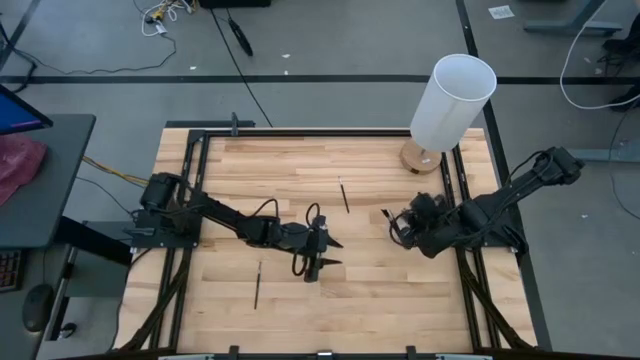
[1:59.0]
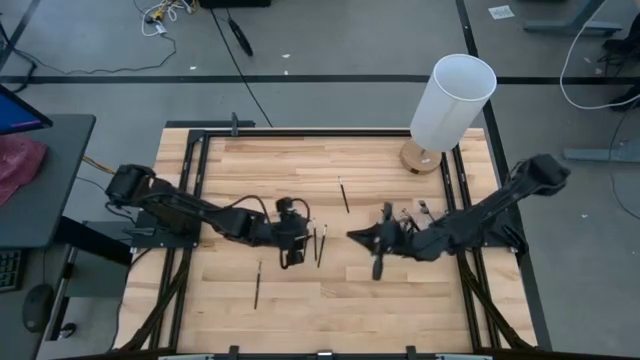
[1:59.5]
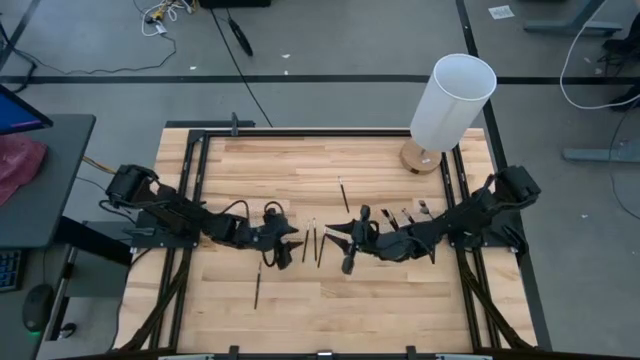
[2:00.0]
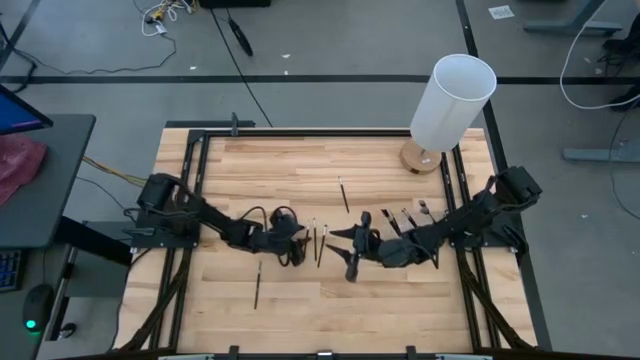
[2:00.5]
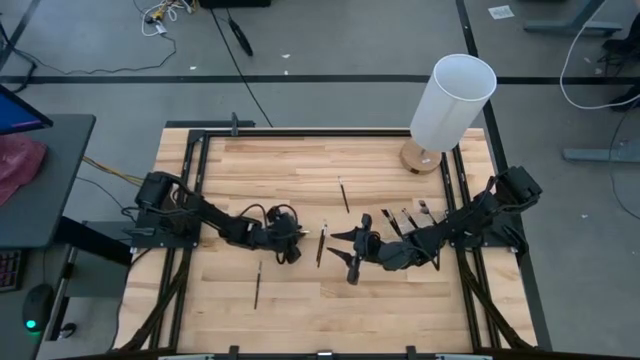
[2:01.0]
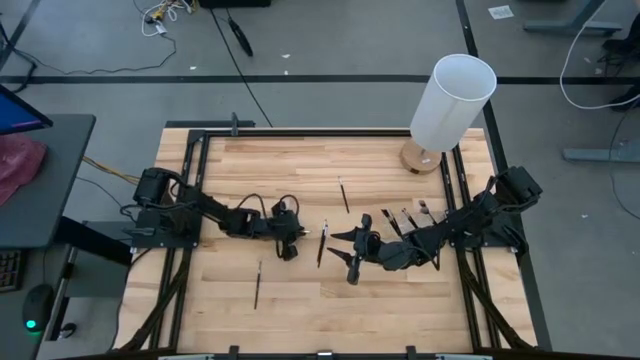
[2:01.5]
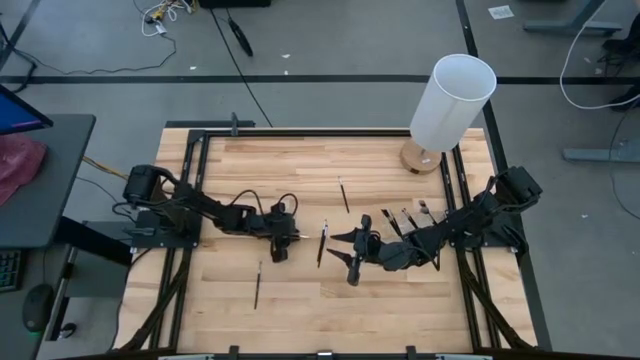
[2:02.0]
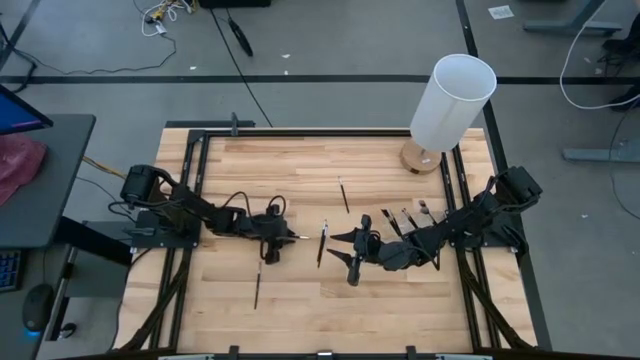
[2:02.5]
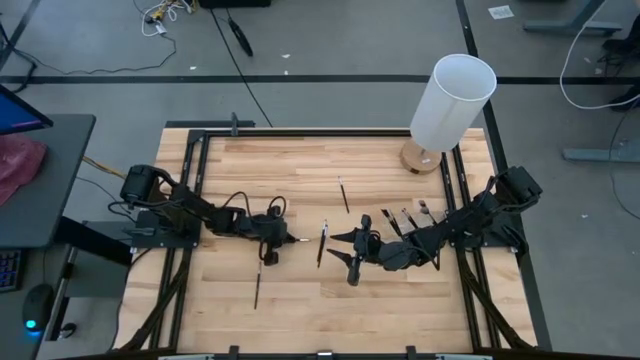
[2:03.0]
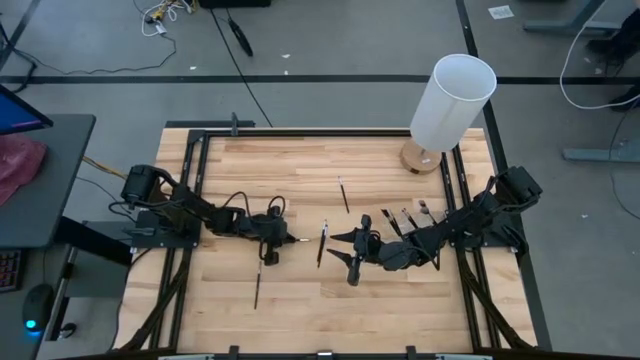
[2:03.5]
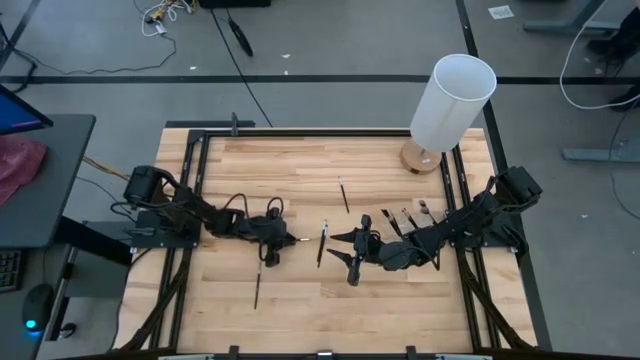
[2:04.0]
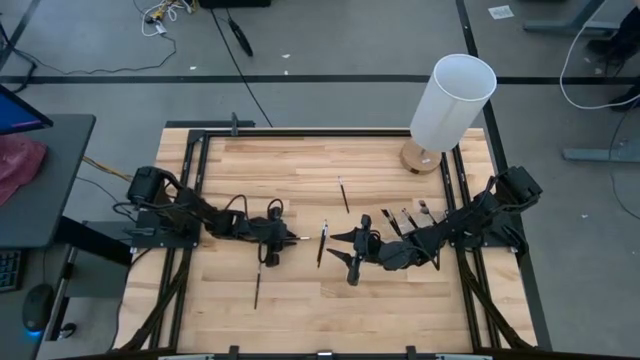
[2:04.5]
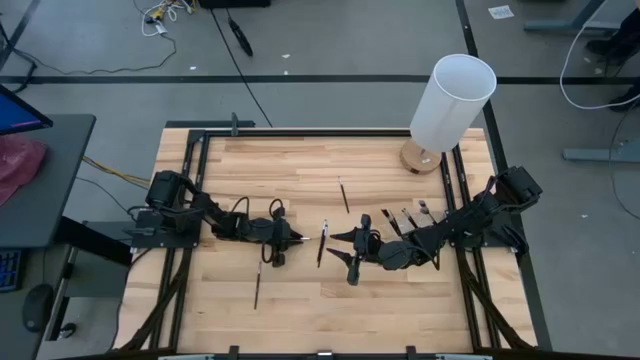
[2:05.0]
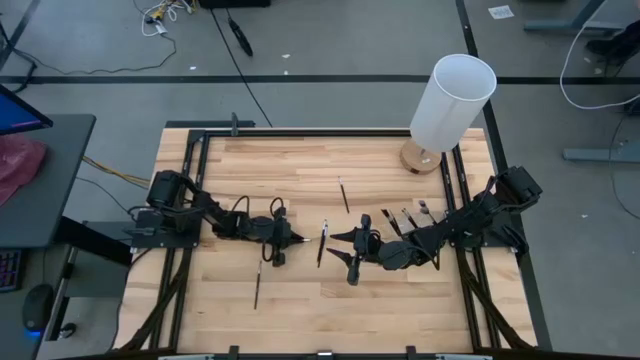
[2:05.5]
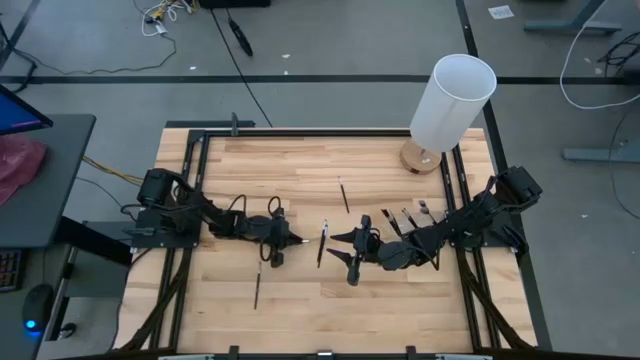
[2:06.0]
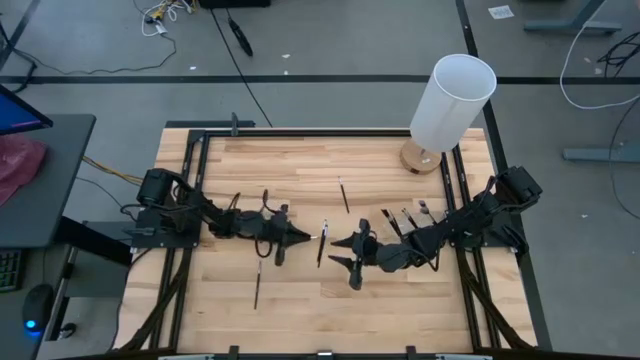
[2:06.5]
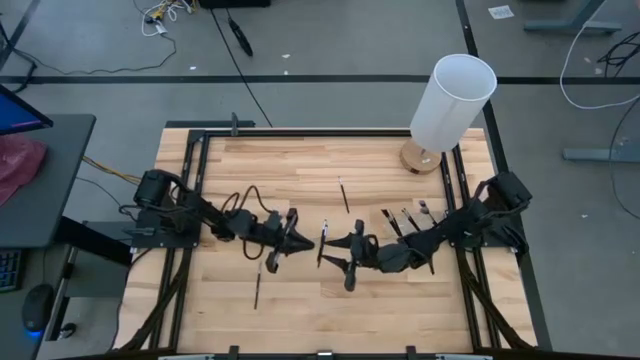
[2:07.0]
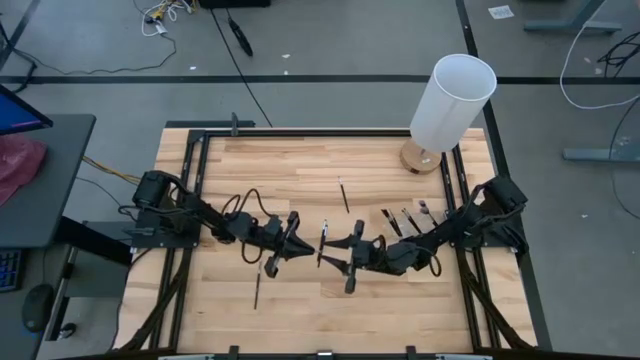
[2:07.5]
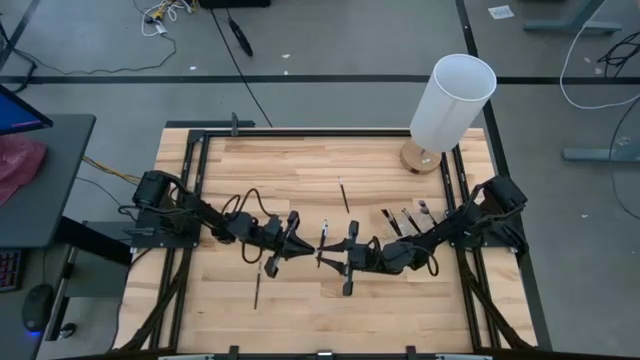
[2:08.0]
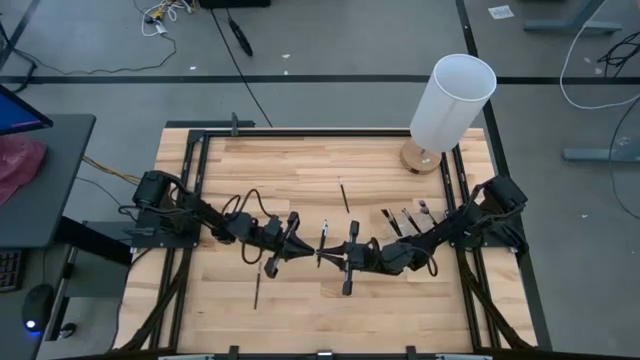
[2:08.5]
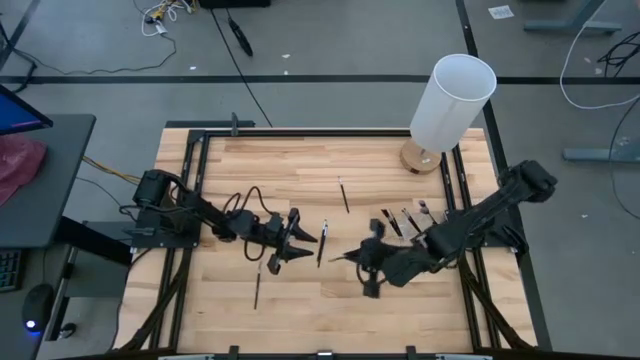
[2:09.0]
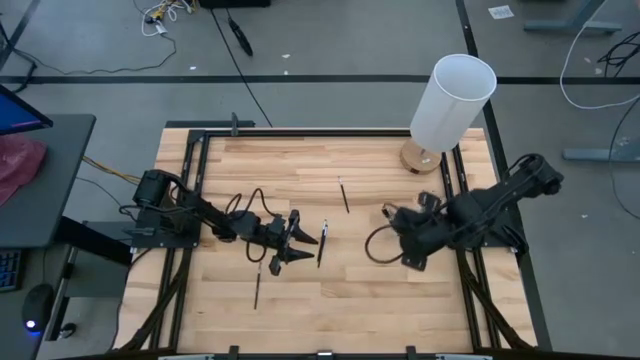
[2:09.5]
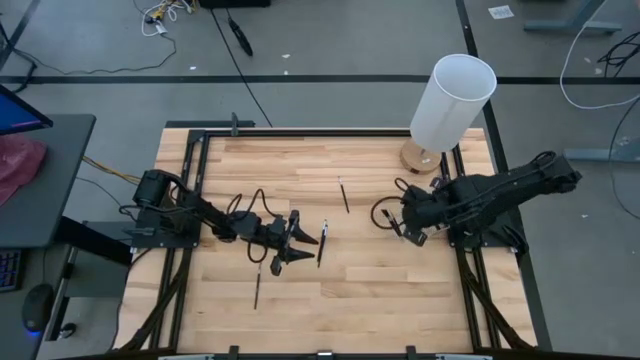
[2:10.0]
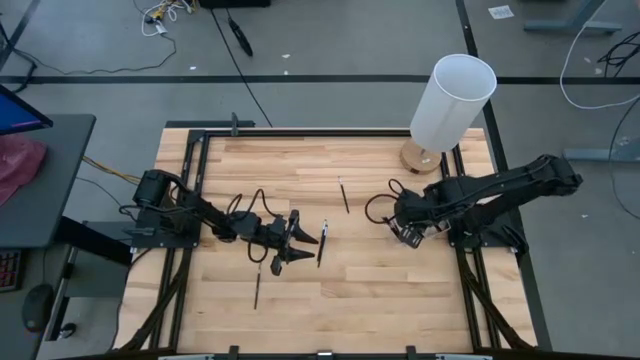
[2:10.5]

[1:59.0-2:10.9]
Task: Put items in baskets/containers
Put the black liner brush into the transparent organizer

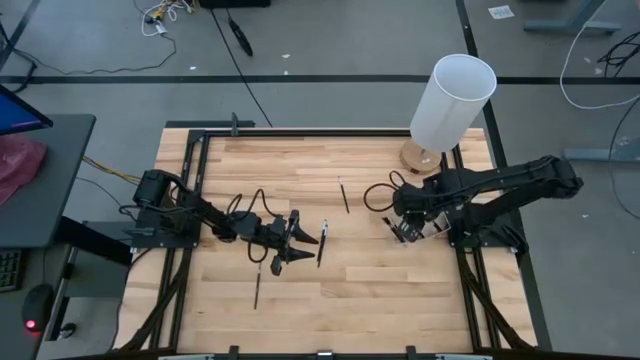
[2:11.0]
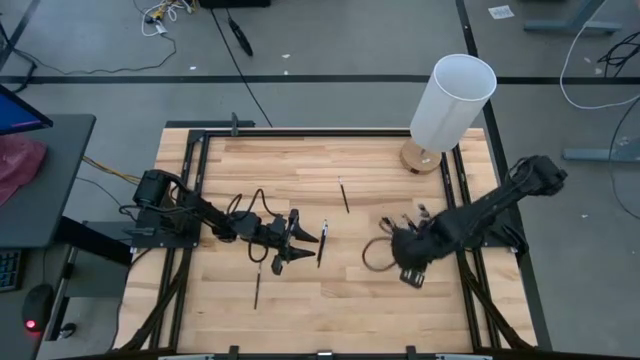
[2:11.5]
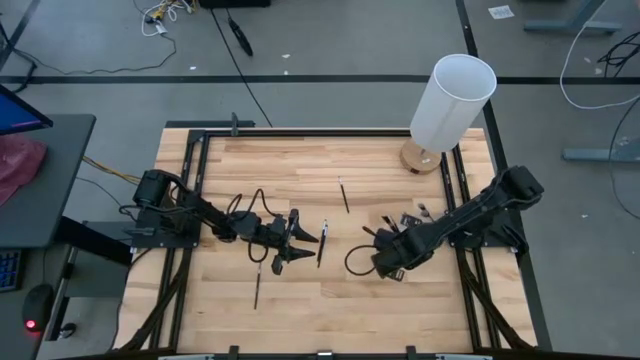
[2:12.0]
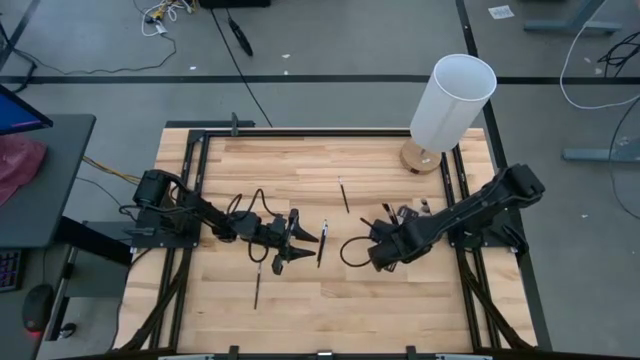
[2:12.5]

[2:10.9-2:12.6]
Adjust the transparent organizer

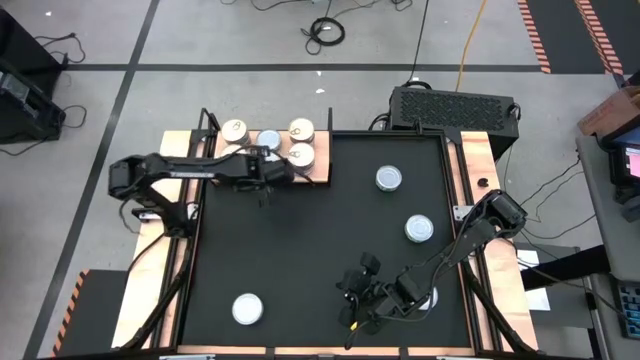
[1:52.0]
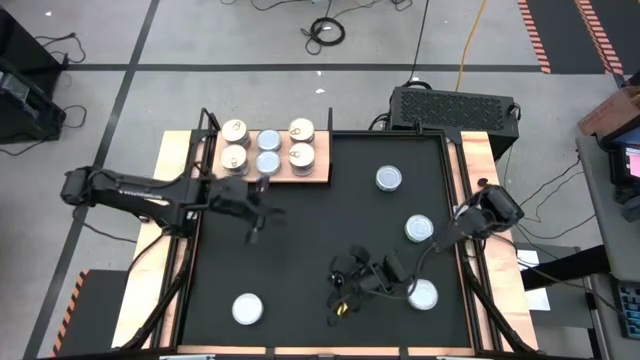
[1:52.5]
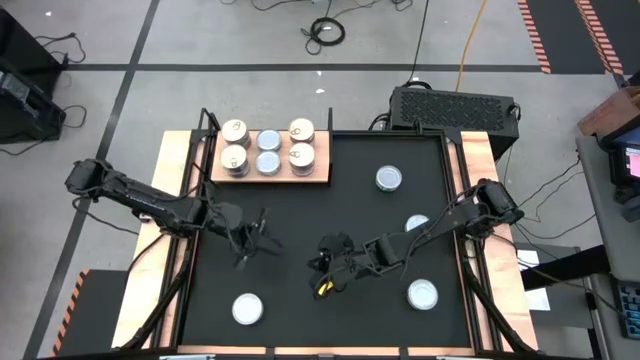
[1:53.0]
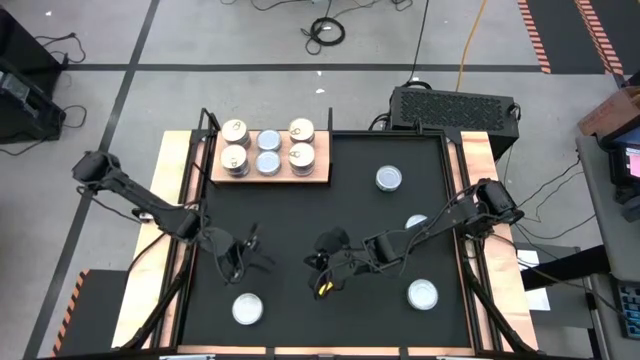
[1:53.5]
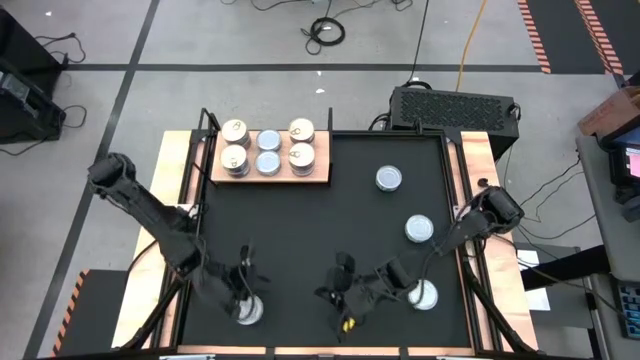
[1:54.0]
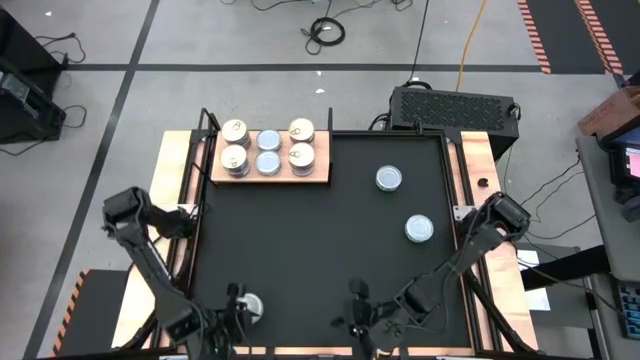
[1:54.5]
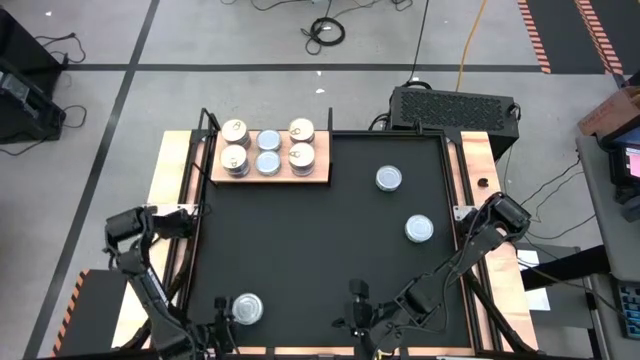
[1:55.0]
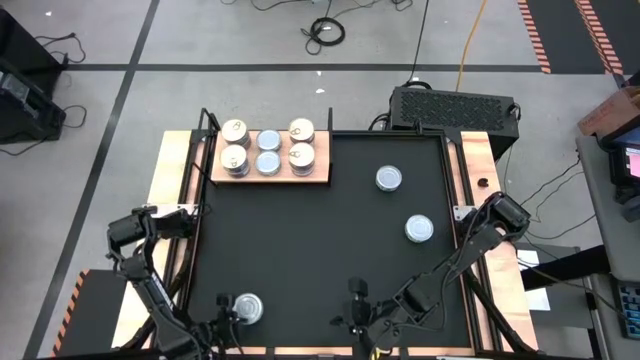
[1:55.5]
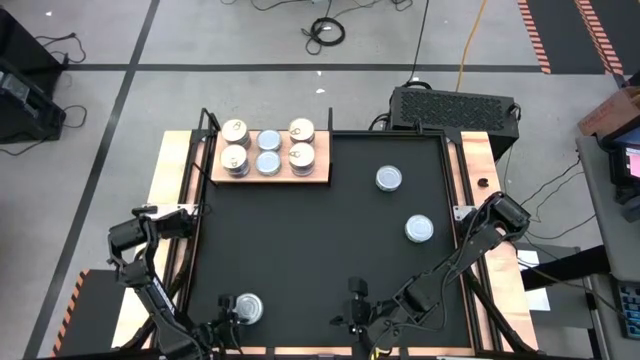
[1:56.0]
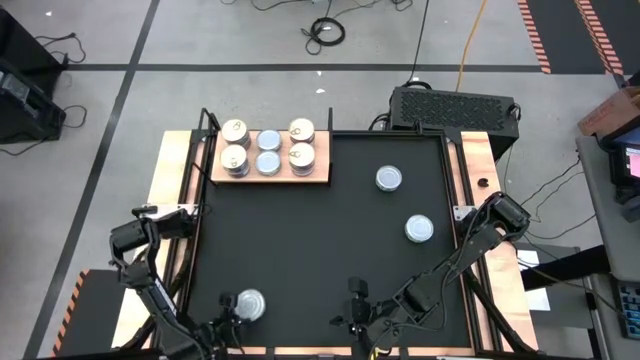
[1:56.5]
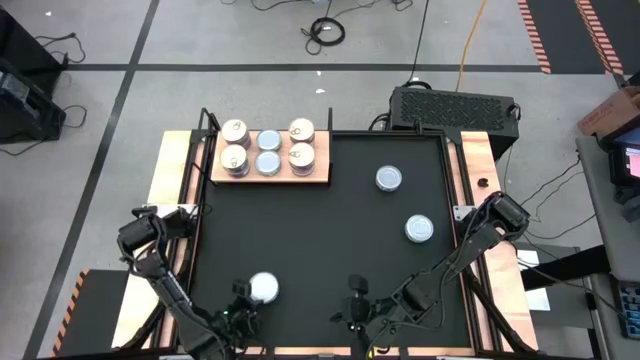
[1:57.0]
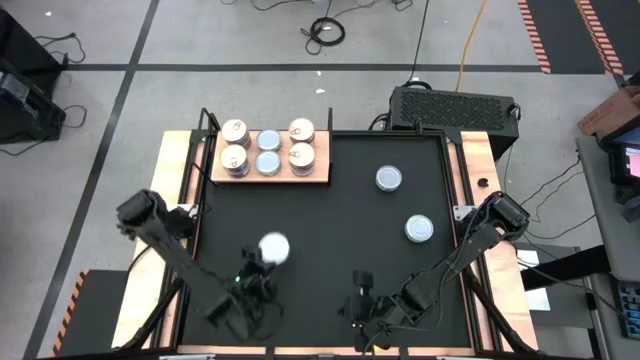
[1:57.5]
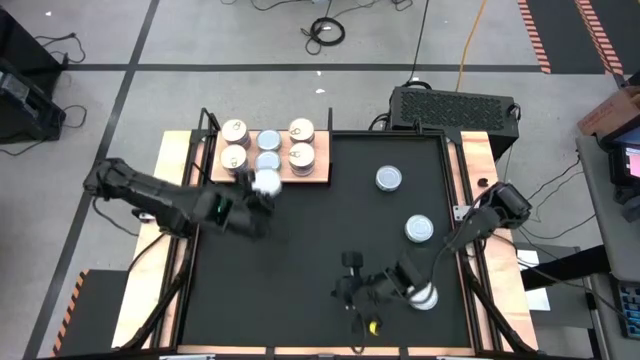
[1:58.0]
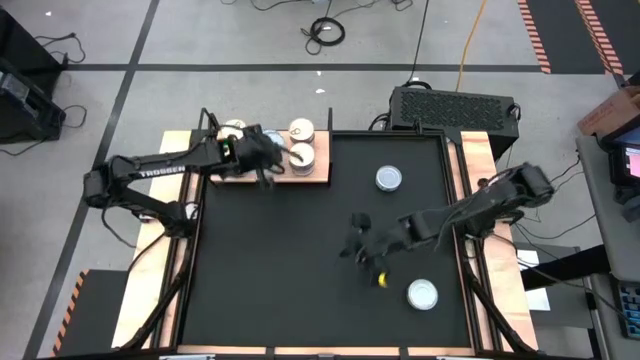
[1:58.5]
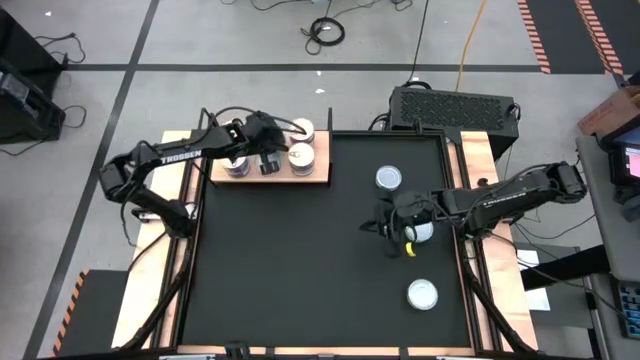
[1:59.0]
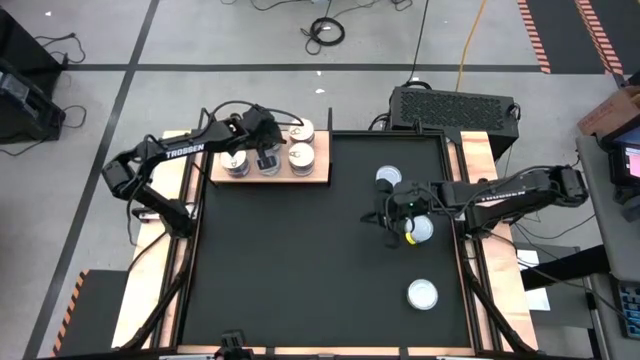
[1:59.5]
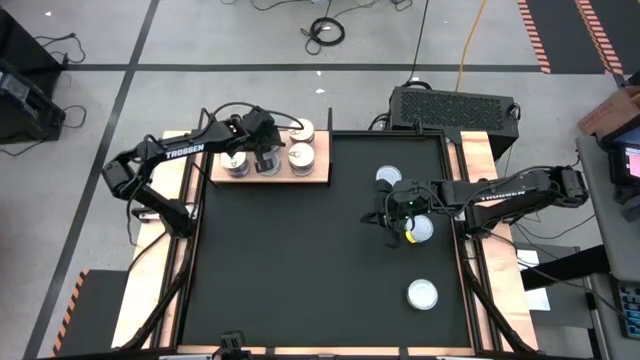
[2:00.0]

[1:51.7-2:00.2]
Task: Stack canned seafood by type on shelf
Stack the green tuna can on top of the green tuna can on the shelf
